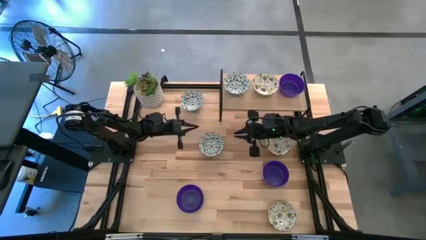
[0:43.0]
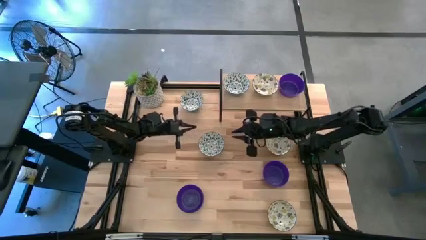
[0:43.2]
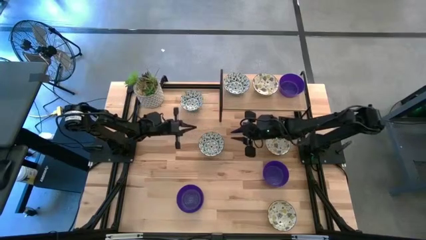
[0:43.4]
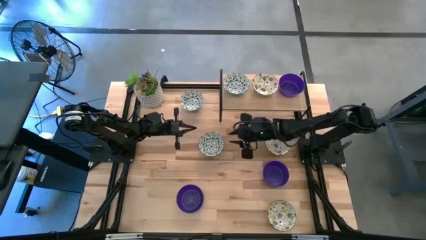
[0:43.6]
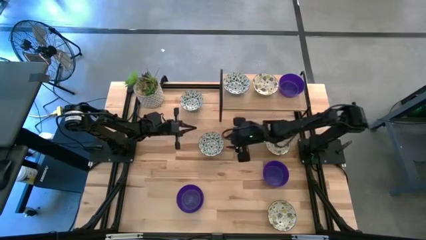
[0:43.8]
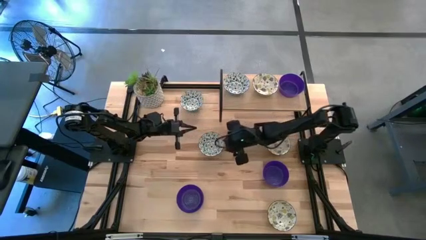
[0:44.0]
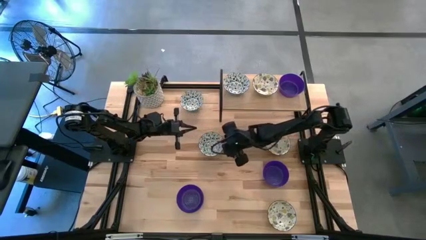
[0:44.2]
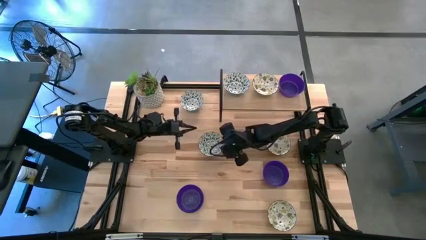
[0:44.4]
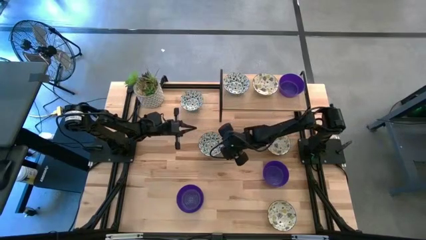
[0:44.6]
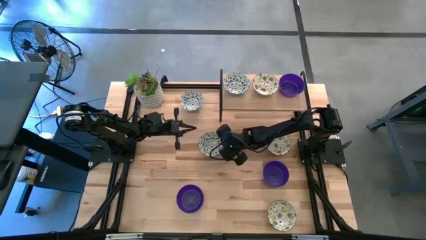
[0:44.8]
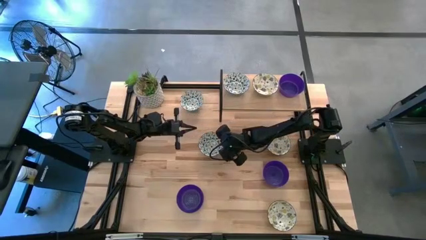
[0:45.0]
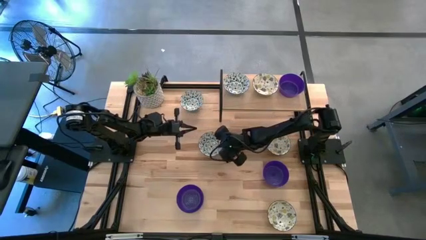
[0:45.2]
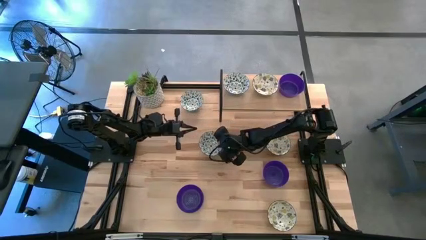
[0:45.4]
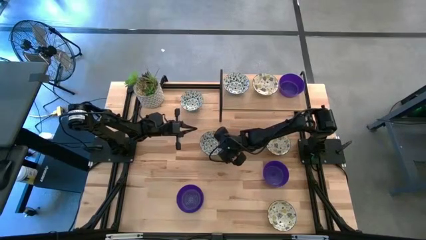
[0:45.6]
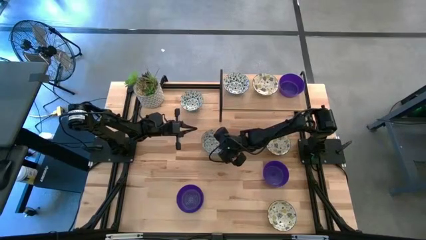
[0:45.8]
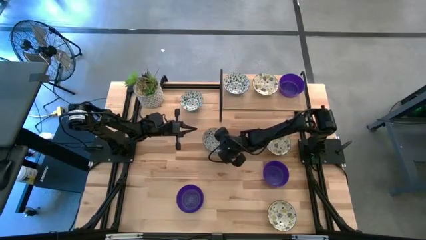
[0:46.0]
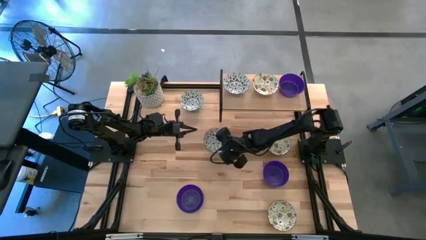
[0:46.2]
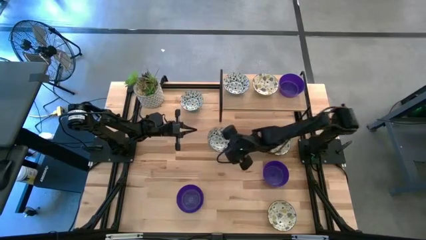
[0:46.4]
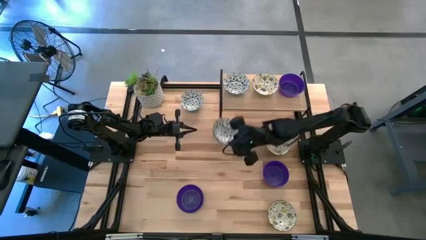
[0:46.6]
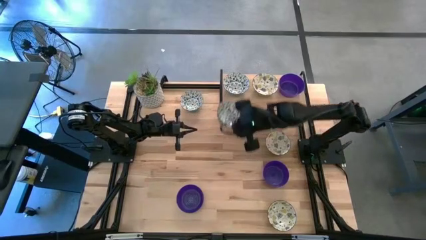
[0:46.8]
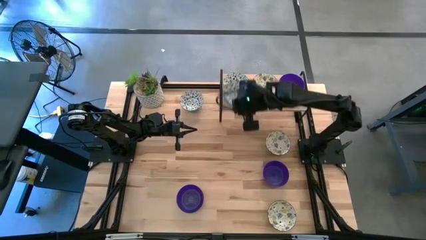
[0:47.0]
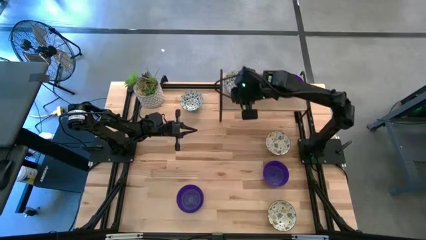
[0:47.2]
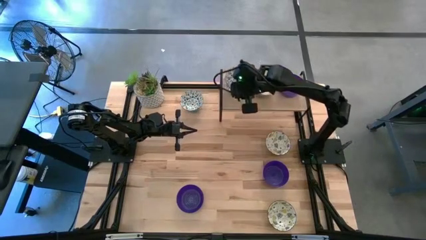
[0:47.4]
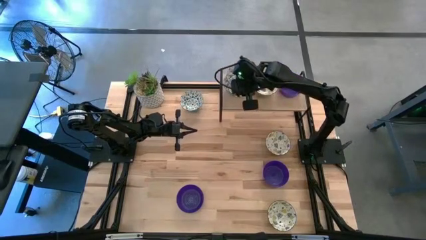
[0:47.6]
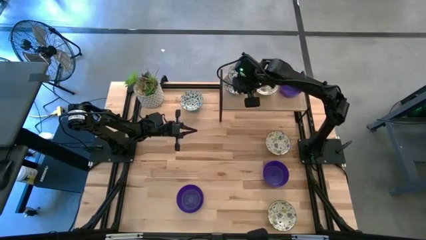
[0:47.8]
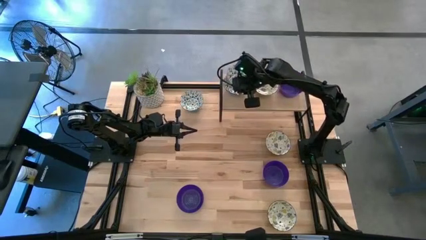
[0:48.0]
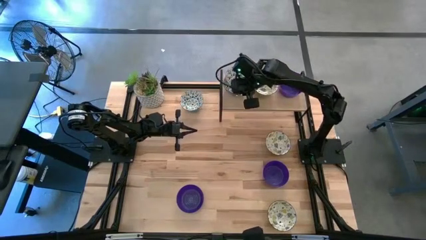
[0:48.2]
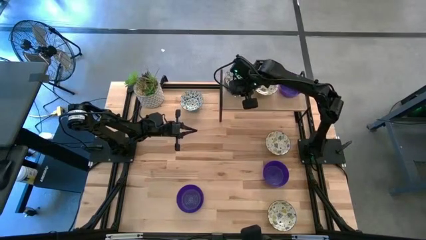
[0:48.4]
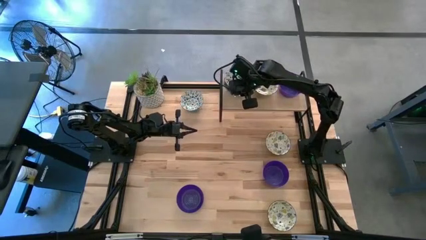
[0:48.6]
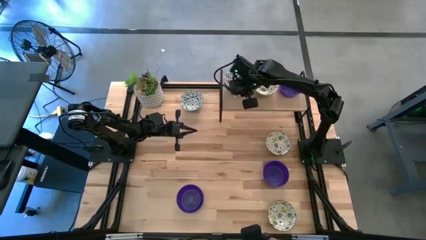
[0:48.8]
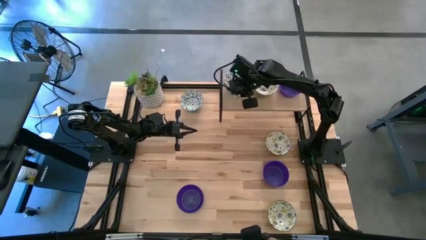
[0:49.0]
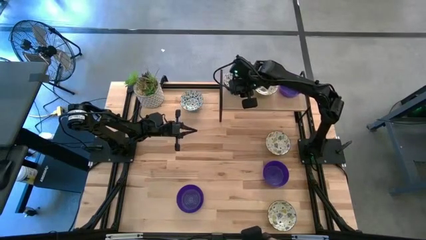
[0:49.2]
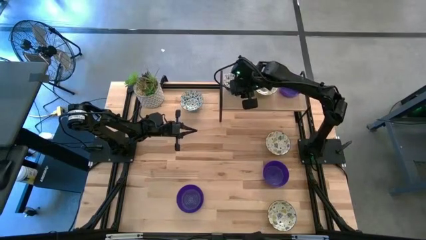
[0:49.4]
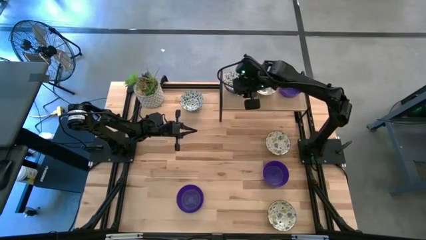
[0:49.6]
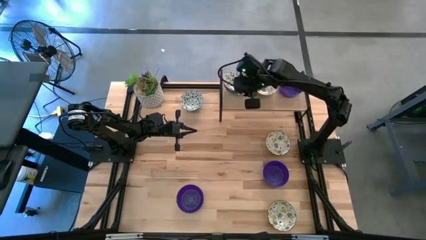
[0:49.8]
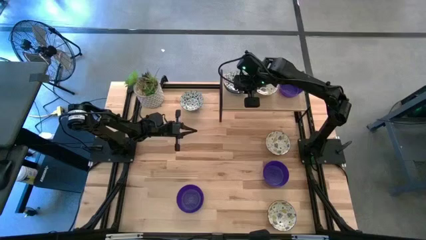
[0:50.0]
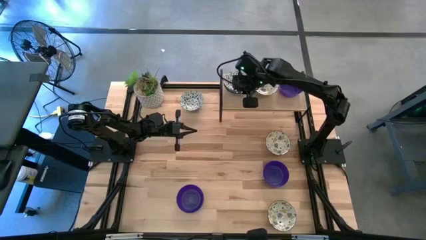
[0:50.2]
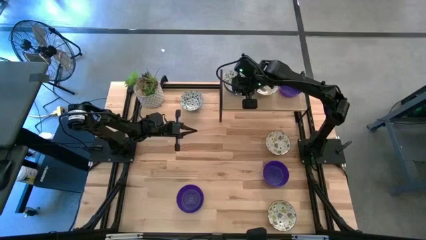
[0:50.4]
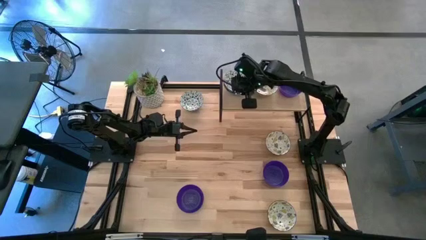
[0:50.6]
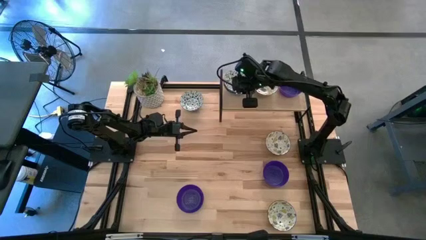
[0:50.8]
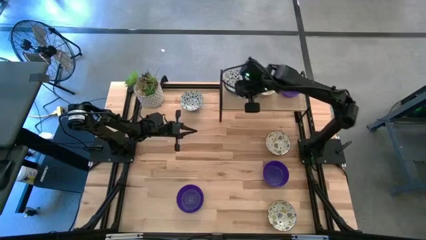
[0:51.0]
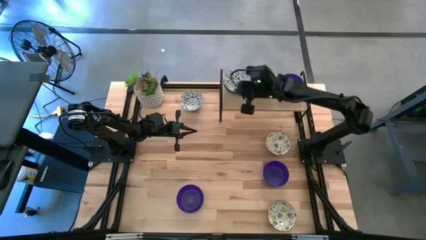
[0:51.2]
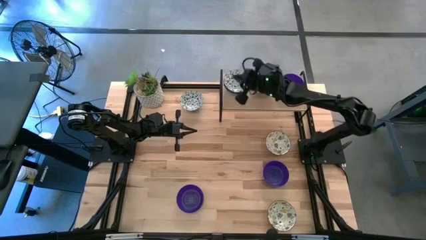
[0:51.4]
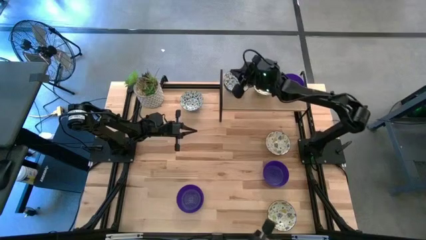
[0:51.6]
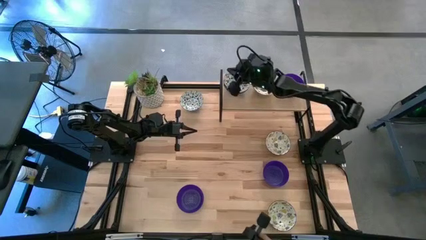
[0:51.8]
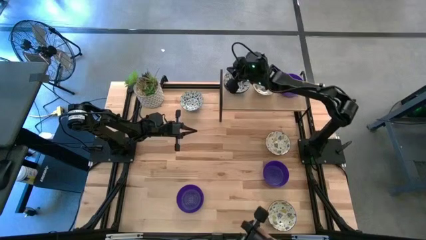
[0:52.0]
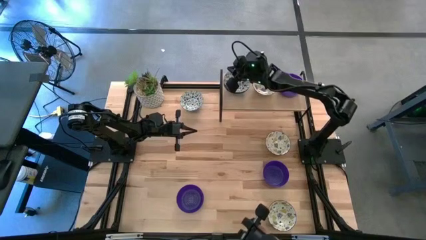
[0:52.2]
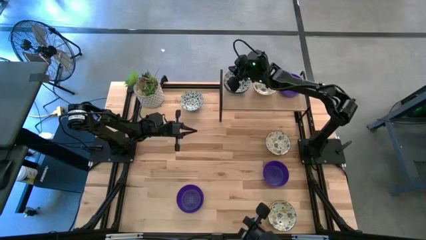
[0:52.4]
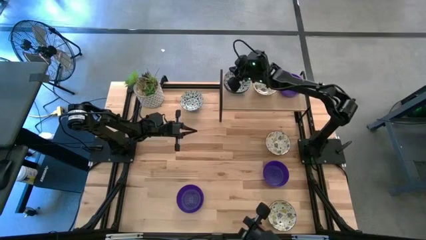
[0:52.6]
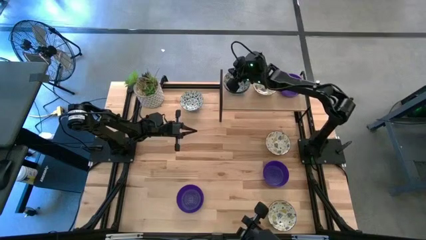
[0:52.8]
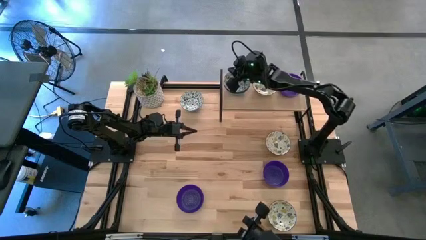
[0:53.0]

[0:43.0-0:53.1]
Task: Pick & Place Mini bowls
Stack the bottom blue patterned bowl on the blue patterned bowl on the shelf

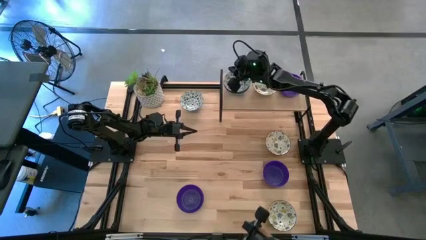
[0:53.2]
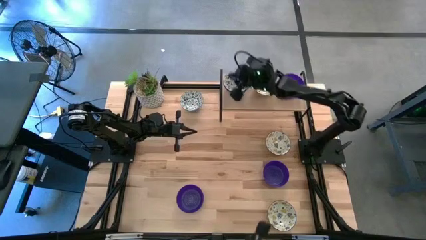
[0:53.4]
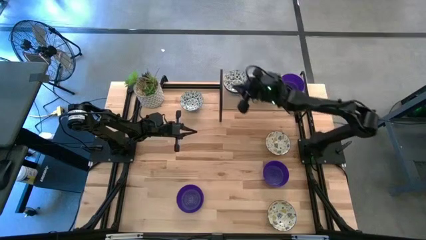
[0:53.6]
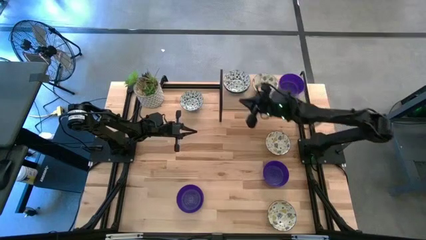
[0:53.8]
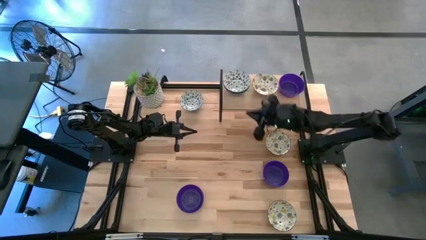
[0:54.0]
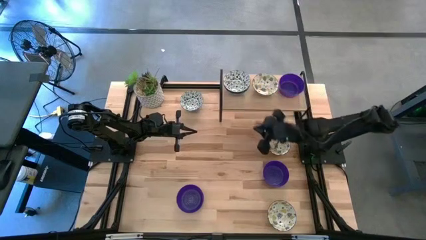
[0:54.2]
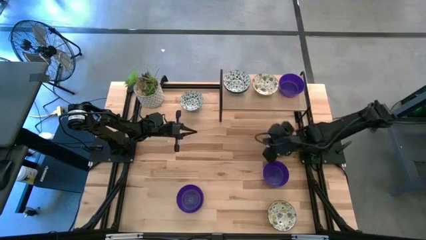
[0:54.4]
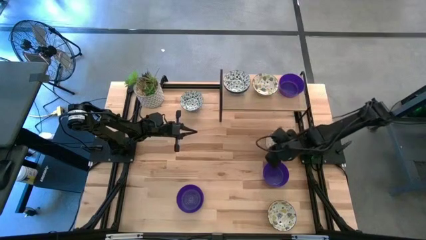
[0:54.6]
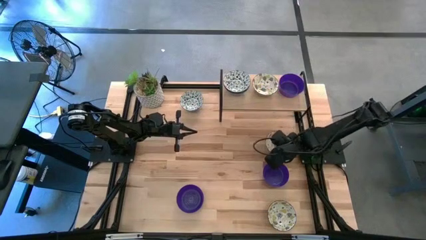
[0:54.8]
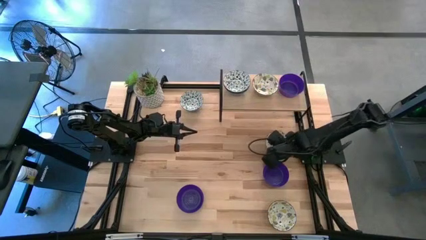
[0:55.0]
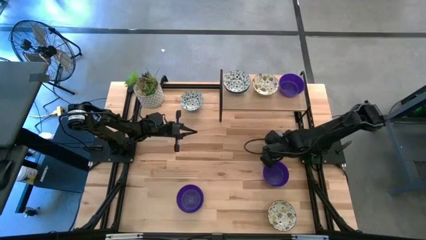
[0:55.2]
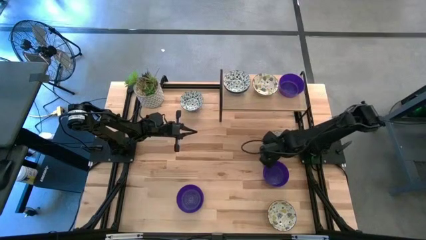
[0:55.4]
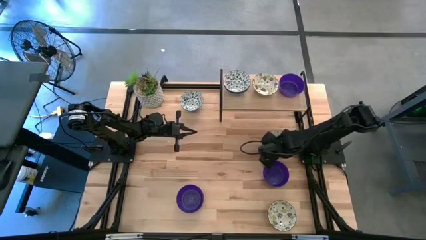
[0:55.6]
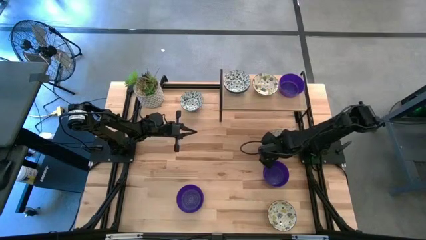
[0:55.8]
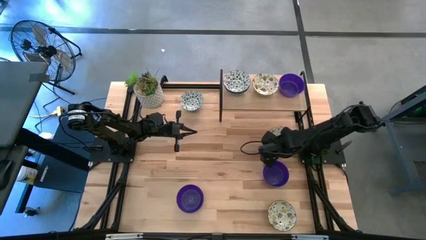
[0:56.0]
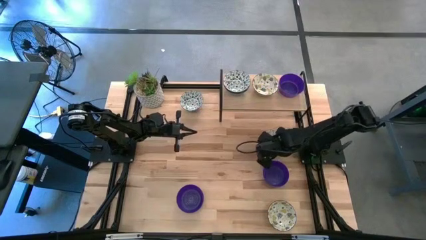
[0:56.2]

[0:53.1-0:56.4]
Stack the top white patterned bowl on the white patterned bowl on the shelf

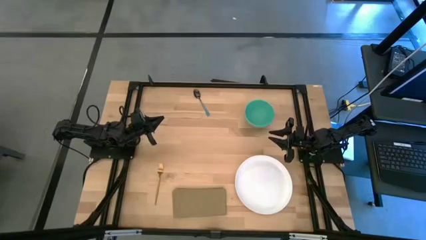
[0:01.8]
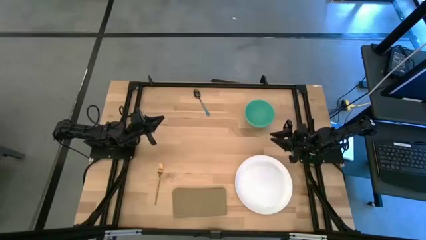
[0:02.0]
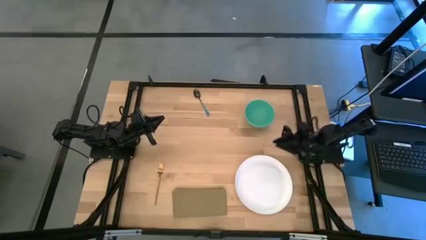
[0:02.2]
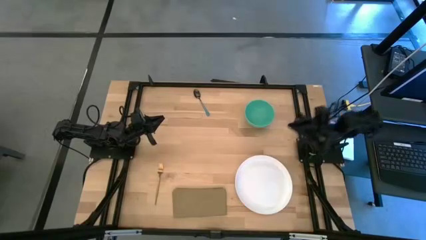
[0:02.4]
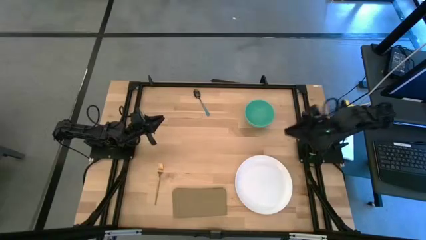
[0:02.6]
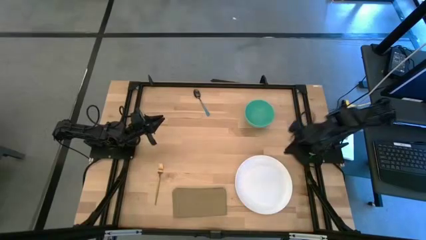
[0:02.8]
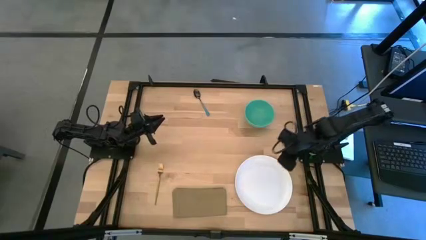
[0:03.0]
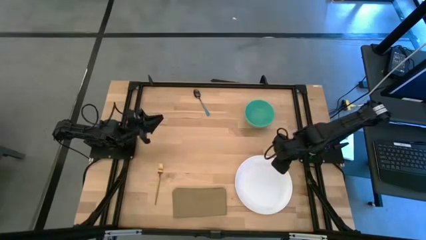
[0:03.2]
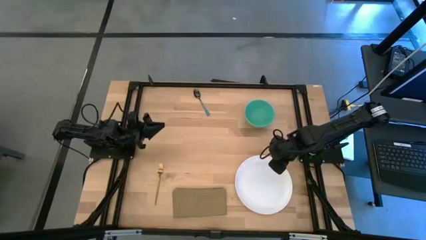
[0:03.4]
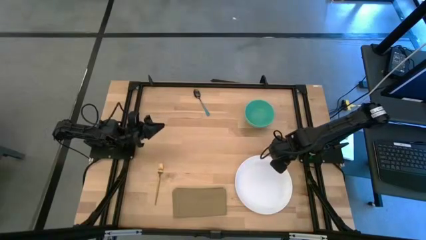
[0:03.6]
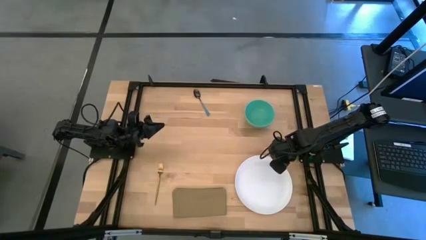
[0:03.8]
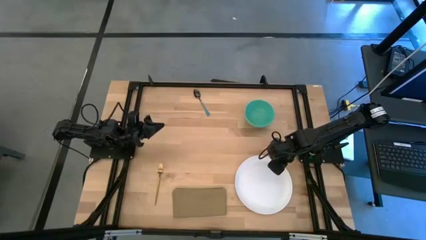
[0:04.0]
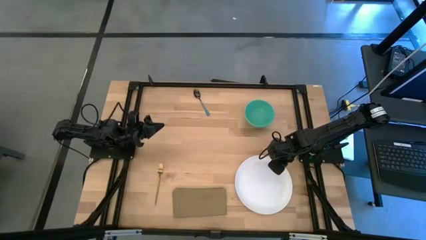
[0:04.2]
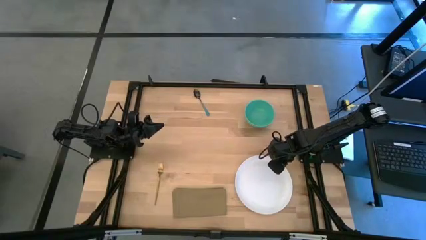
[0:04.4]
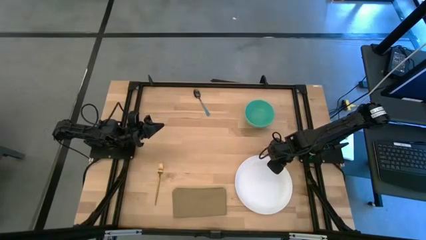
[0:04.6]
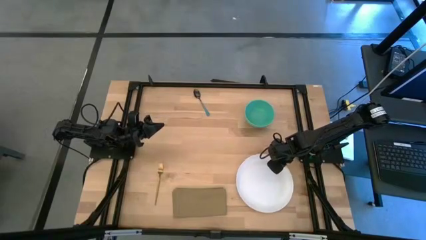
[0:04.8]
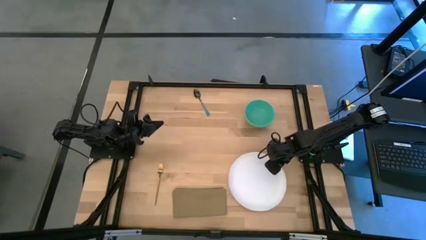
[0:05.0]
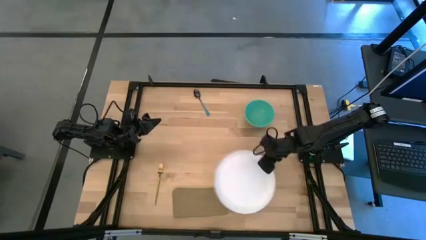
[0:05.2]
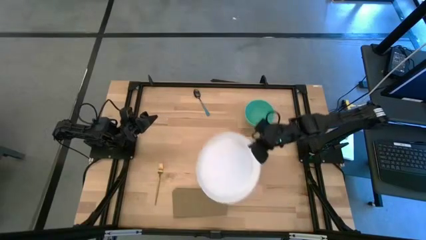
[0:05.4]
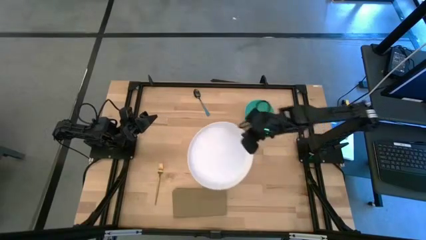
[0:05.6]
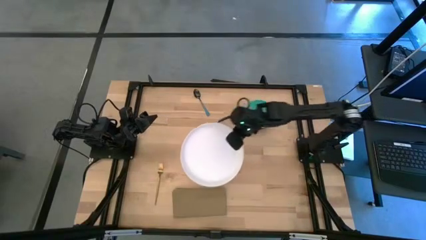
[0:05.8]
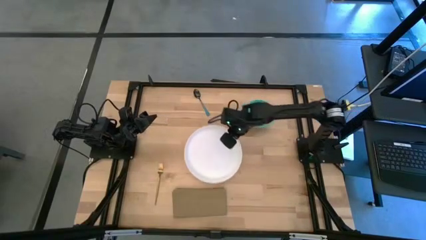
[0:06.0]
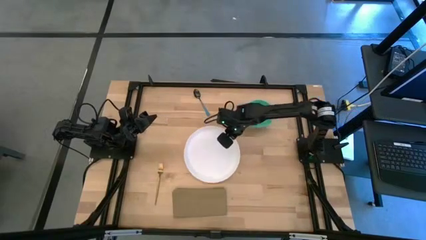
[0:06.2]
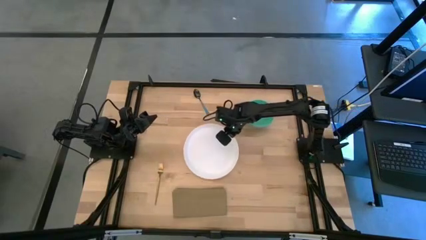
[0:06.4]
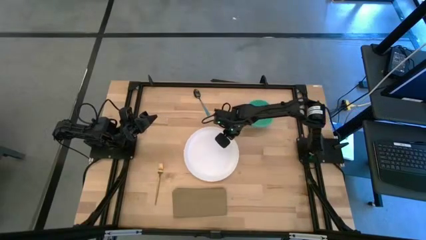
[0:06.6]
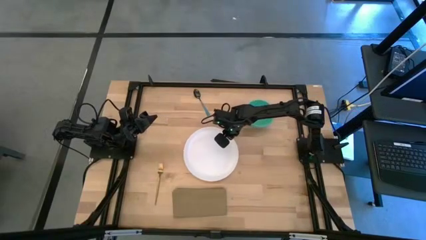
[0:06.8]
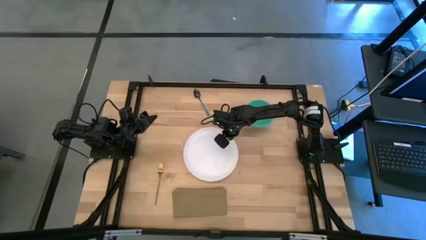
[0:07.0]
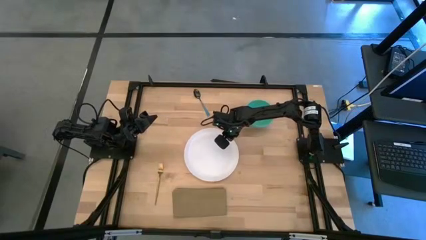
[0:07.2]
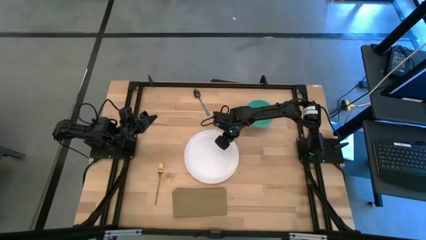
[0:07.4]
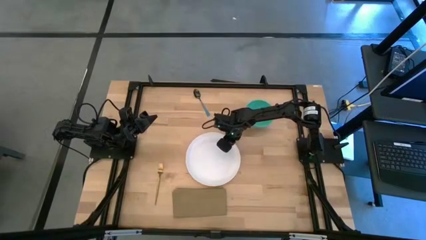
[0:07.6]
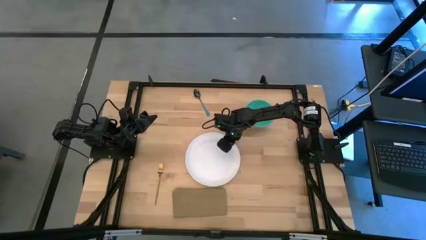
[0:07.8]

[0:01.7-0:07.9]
Task: Set table place
Put the white plate at the center of the table
